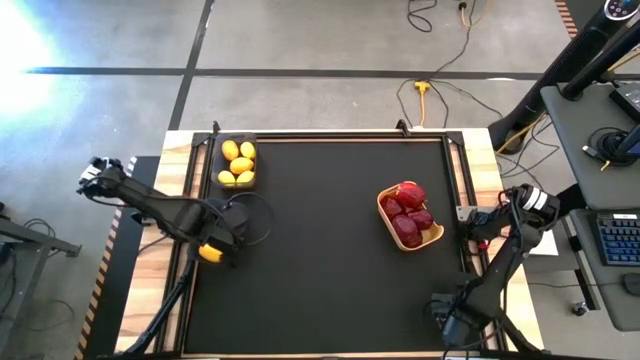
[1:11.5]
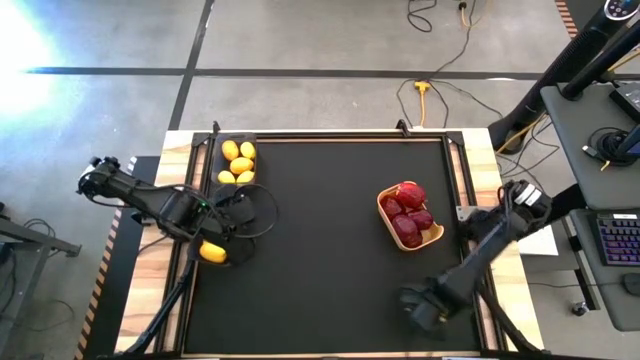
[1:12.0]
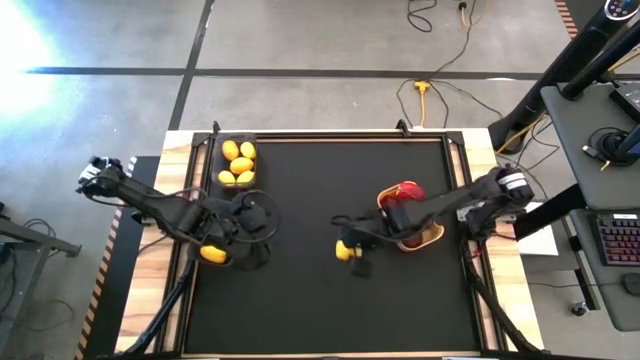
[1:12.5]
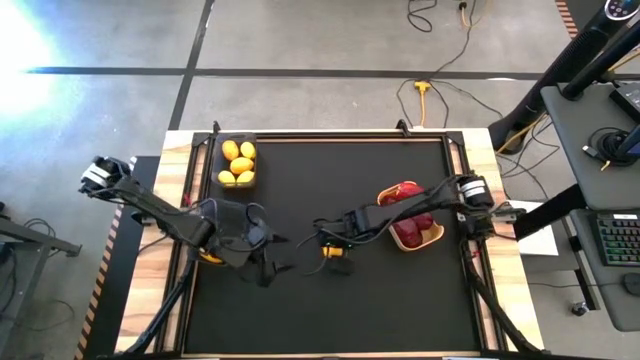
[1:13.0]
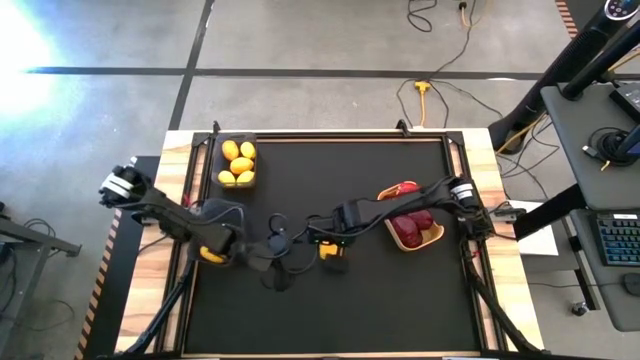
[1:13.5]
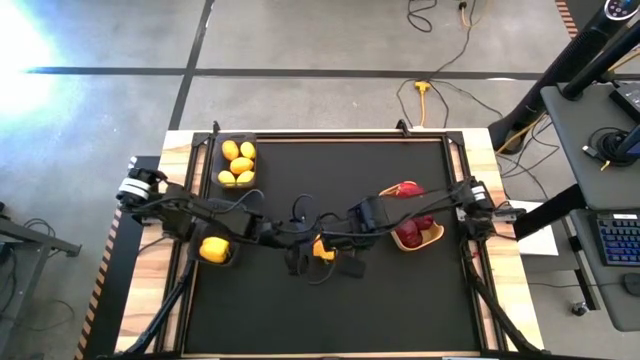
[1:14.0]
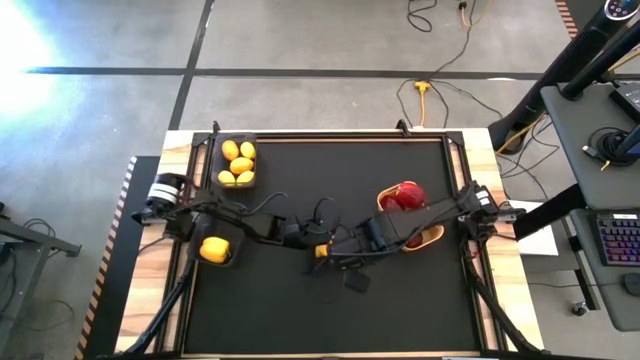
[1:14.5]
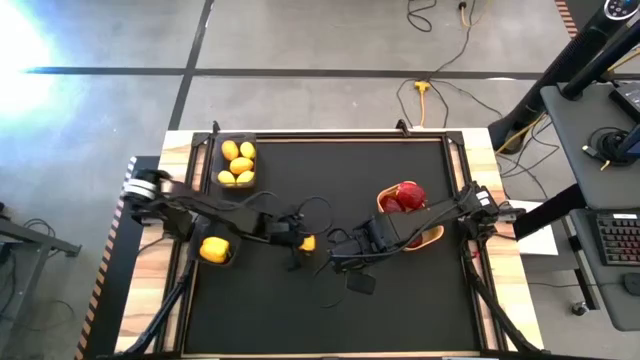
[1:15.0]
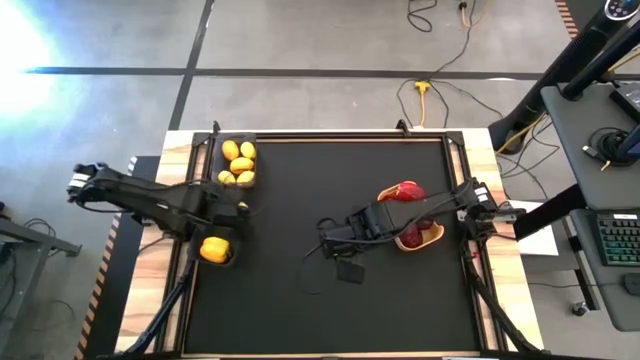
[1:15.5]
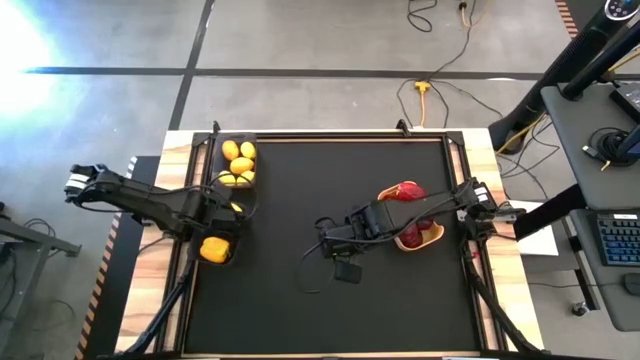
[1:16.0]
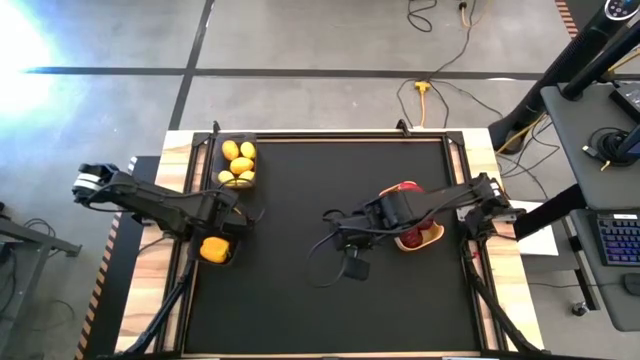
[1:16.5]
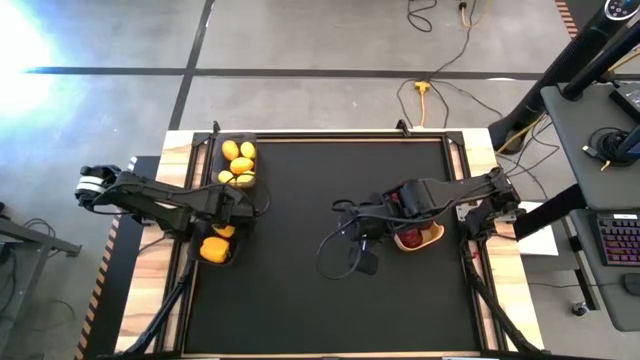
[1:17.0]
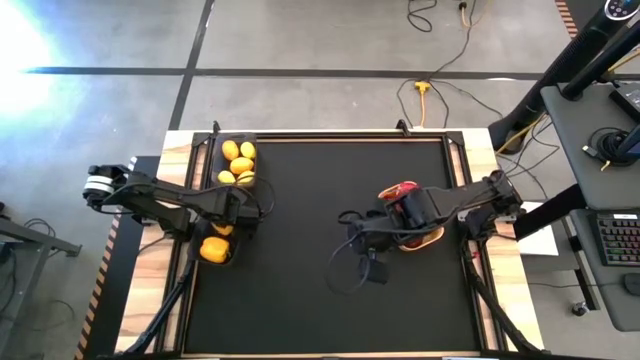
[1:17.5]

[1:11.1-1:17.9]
Task: Sort produce into baskets
Put the yellow bell pepper into the bottom black bin

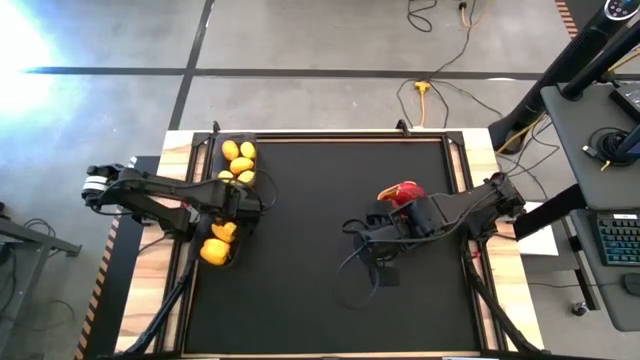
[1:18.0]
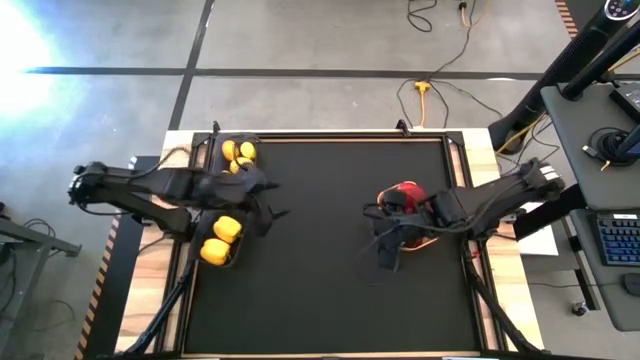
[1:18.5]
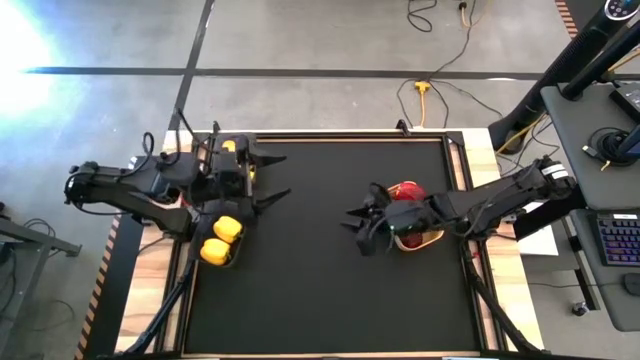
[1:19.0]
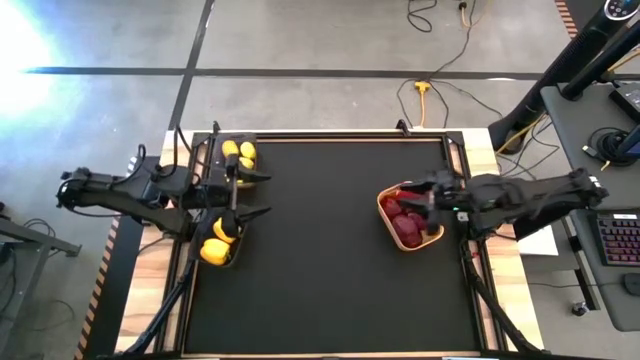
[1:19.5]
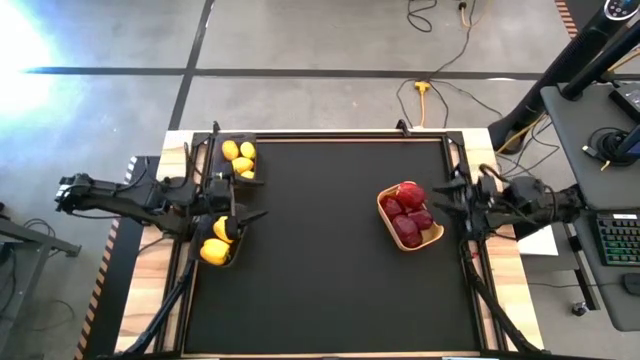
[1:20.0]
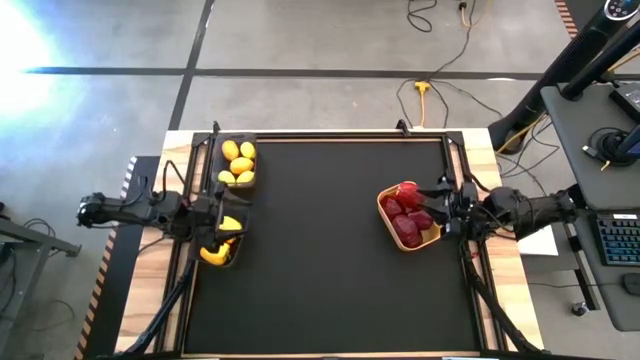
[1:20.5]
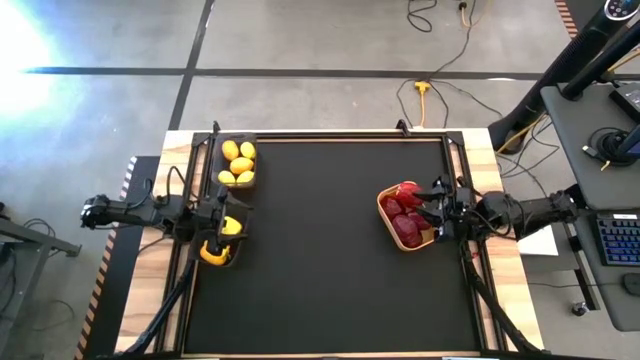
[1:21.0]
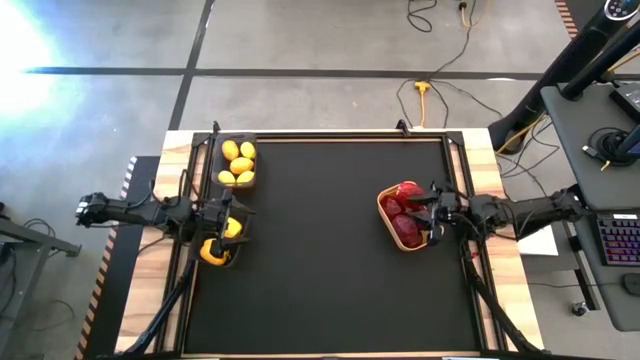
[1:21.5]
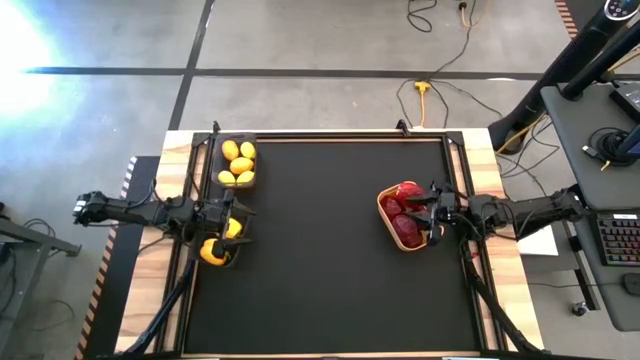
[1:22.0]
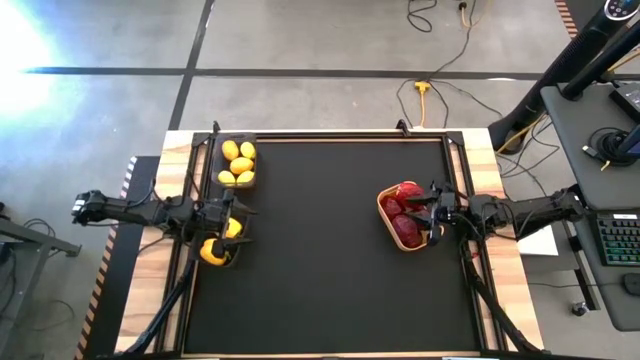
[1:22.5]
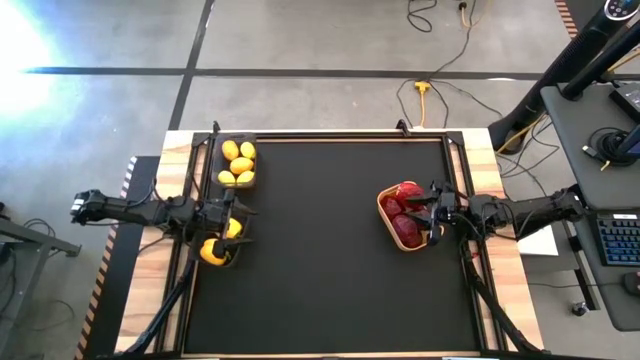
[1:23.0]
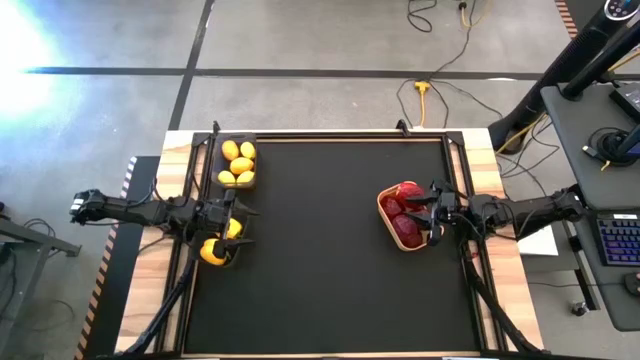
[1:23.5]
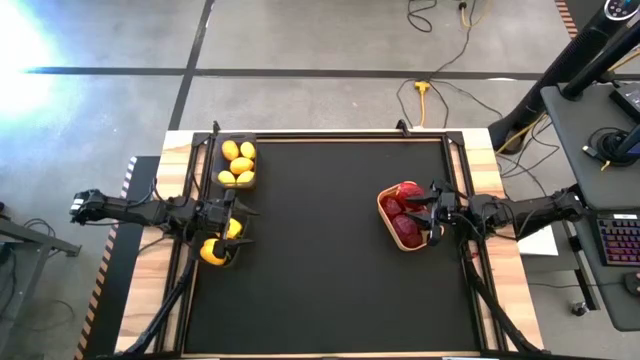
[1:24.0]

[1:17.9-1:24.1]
Return to Home Position

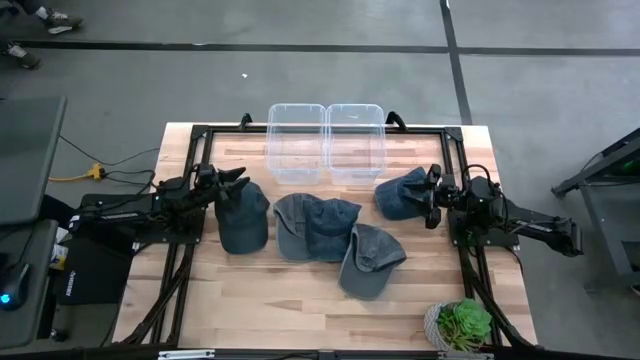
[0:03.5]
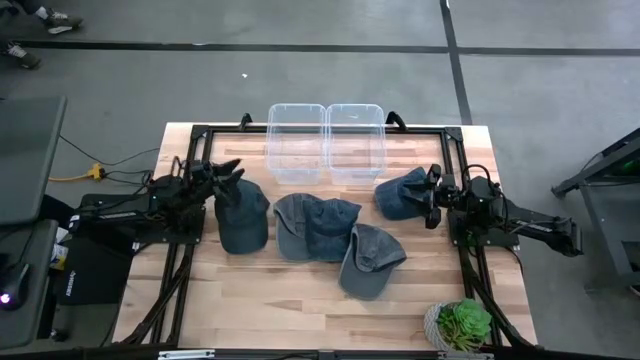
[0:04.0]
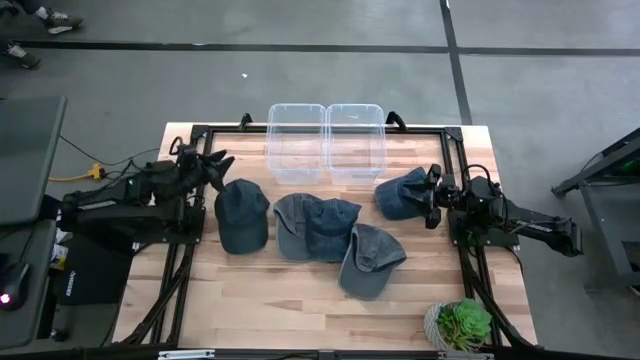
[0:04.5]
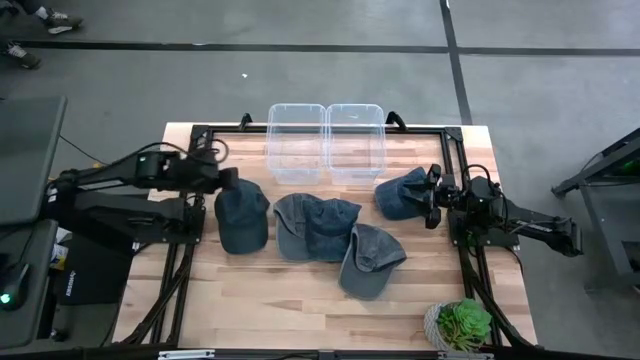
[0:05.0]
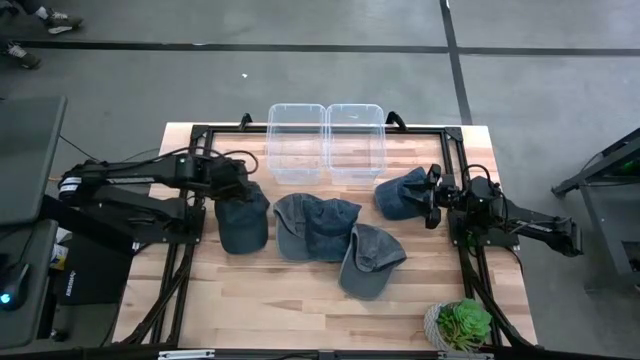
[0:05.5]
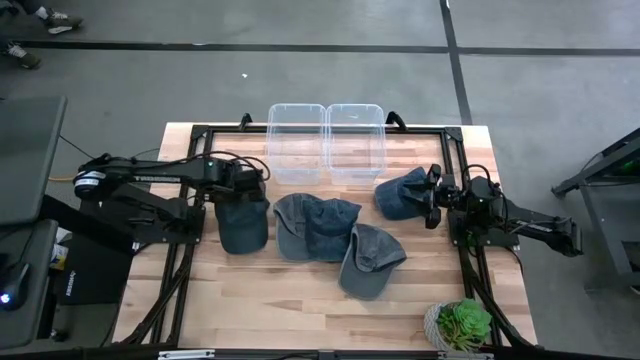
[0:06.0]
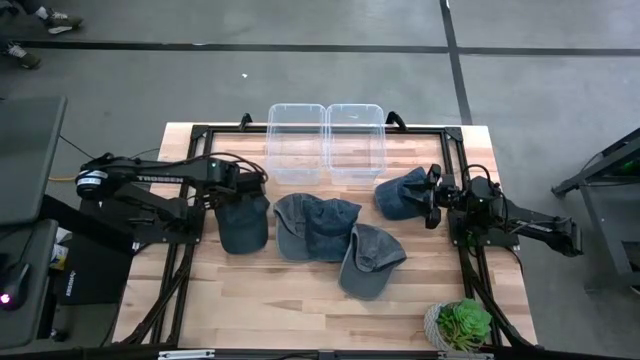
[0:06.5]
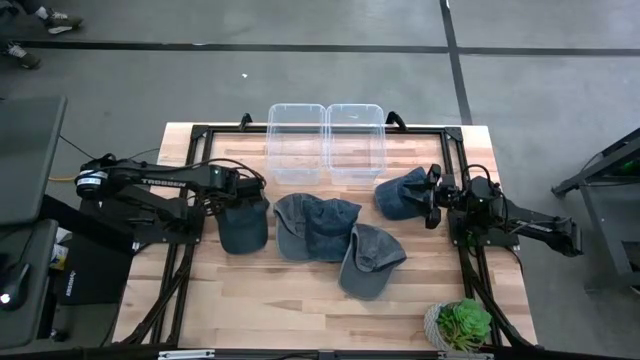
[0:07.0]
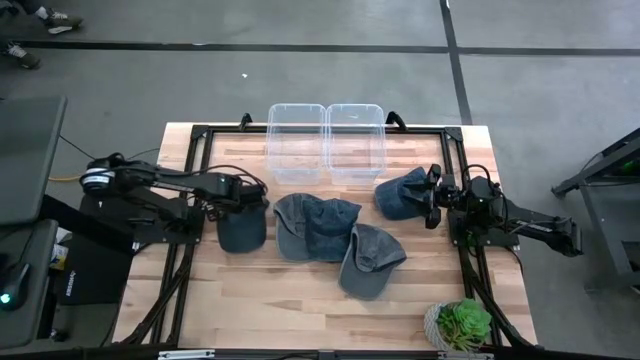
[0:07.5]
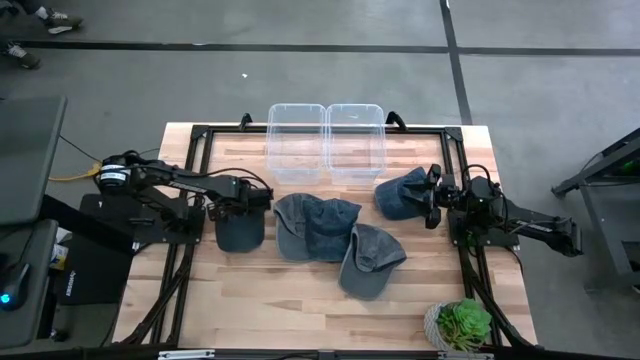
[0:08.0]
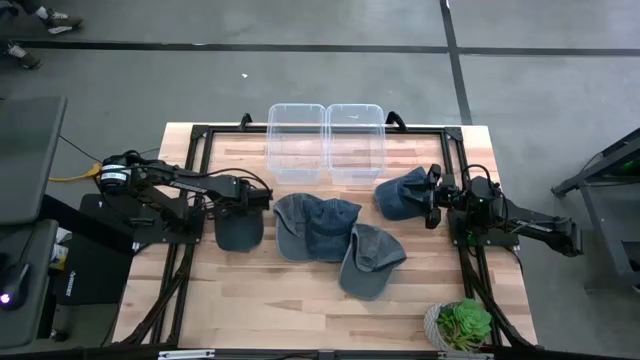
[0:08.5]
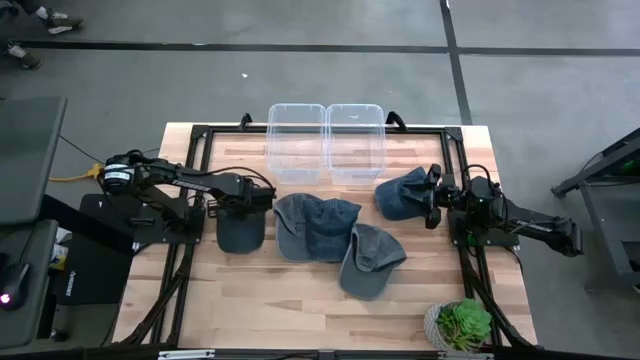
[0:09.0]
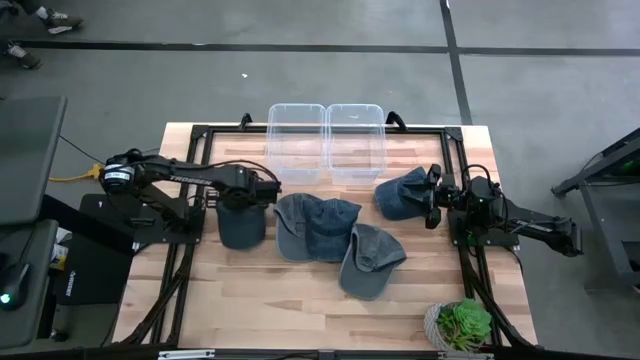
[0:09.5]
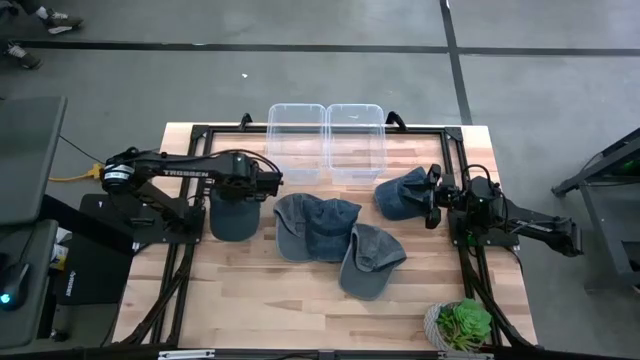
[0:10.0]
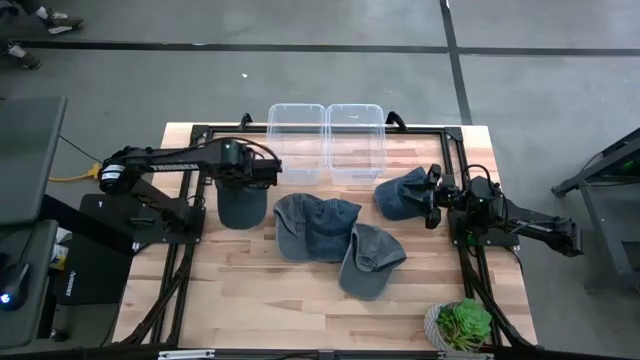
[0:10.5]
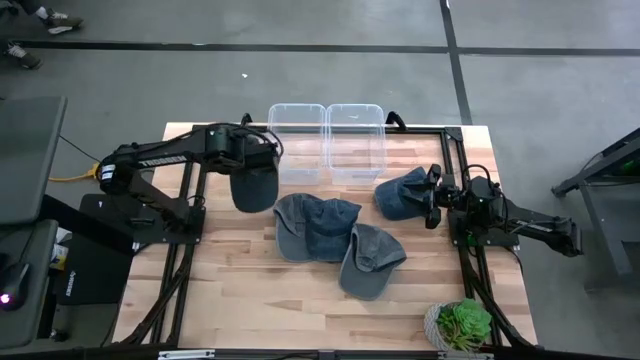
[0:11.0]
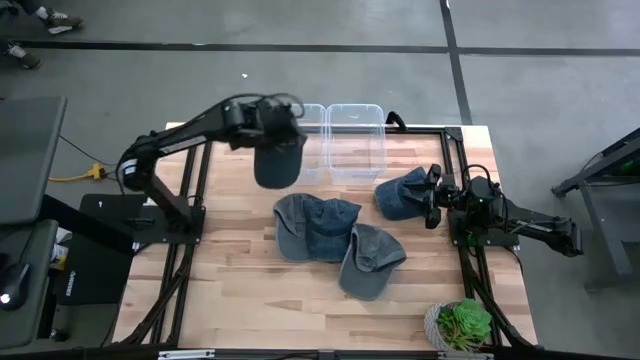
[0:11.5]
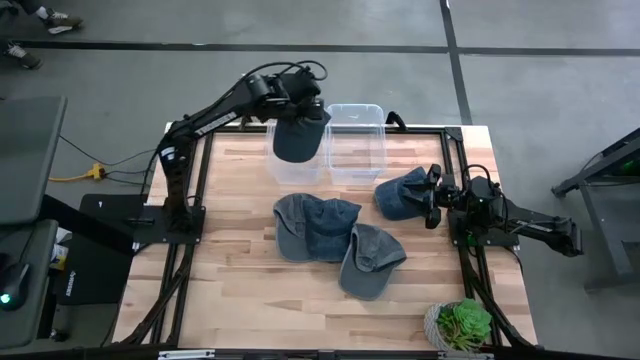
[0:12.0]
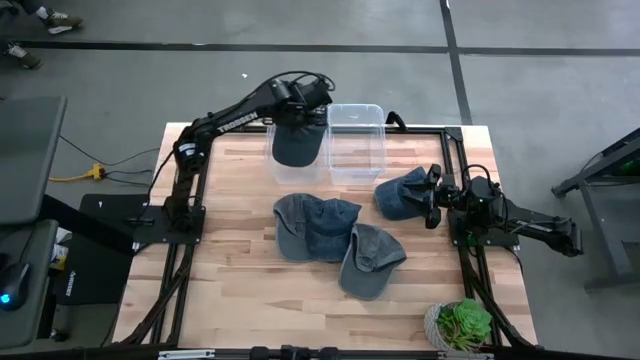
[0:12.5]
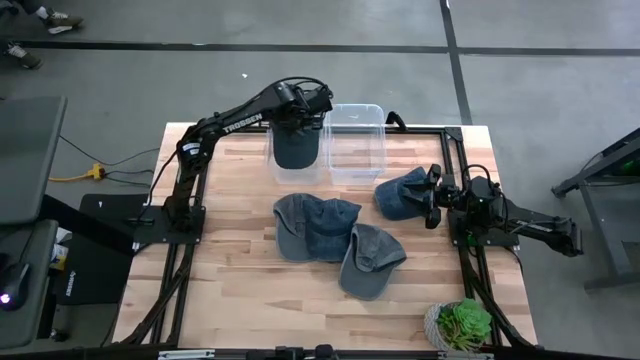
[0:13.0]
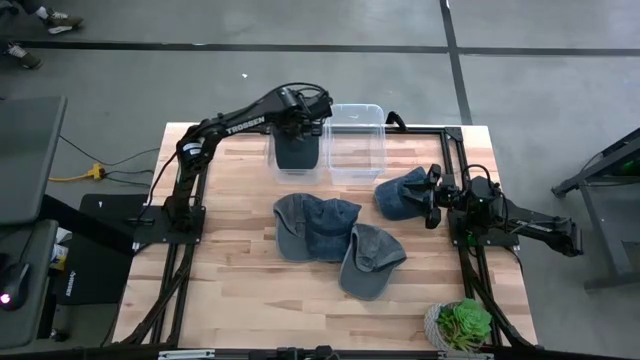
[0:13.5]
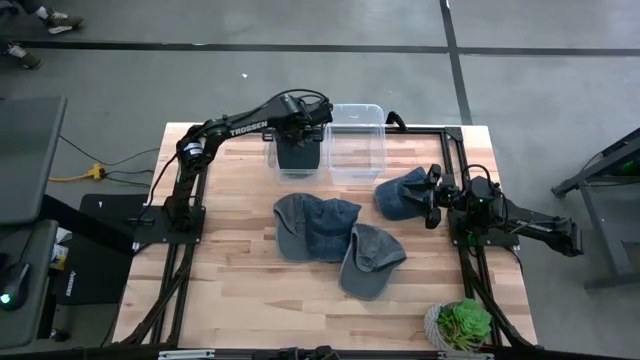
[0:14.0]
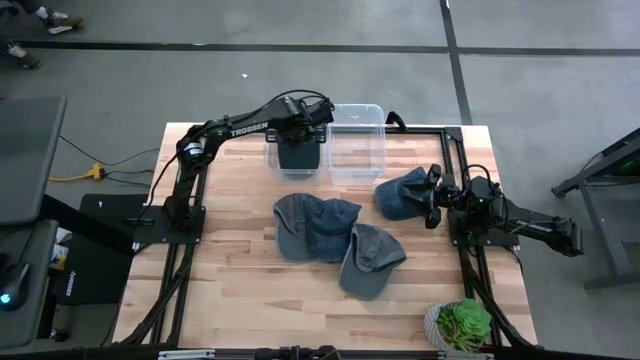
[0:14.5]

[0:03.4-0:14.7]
Task: Pick & Place hat
Put the left blue cap into the left transparent bin
